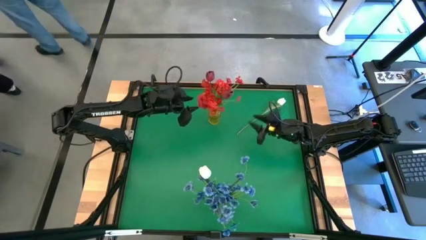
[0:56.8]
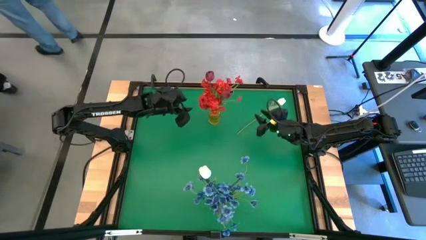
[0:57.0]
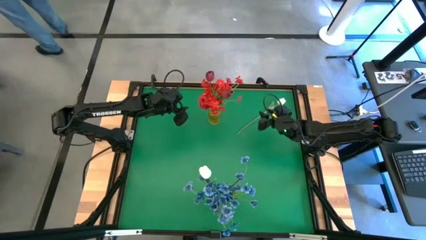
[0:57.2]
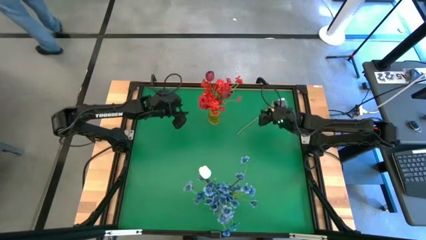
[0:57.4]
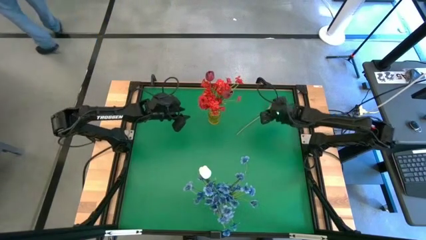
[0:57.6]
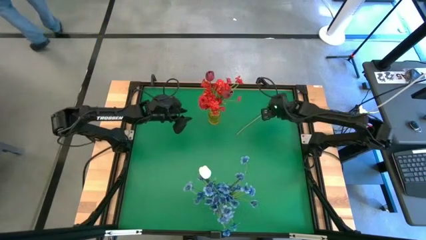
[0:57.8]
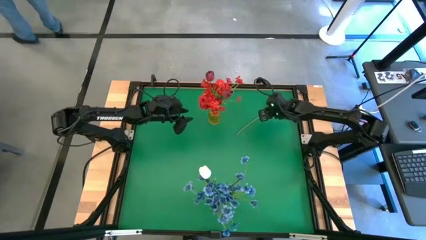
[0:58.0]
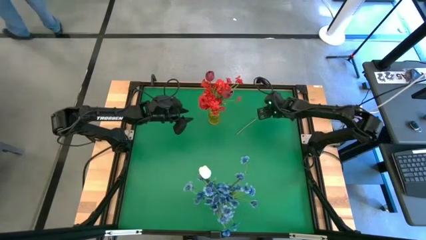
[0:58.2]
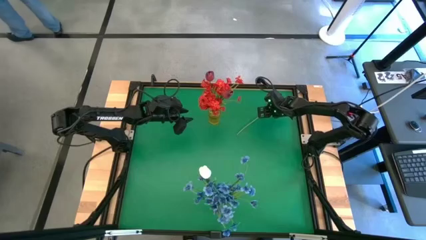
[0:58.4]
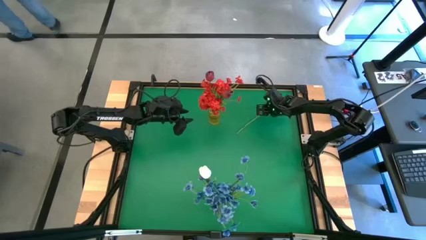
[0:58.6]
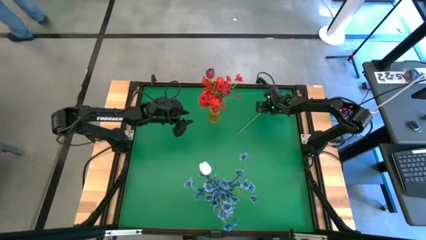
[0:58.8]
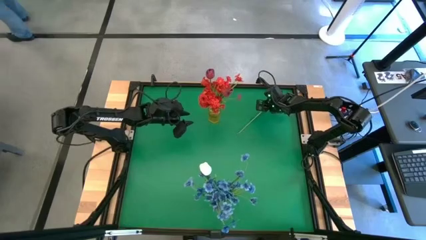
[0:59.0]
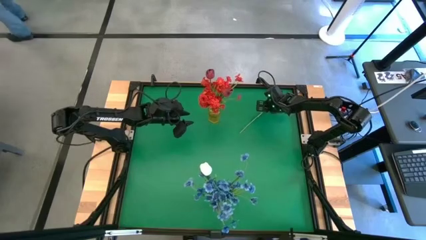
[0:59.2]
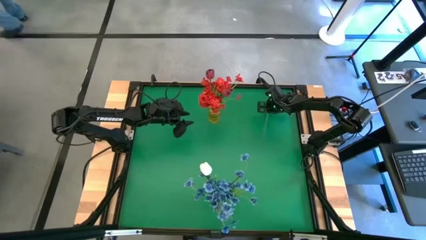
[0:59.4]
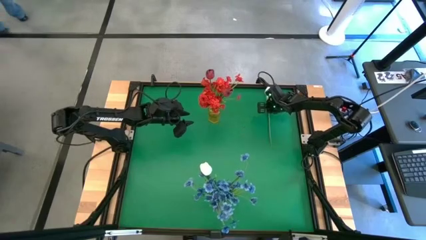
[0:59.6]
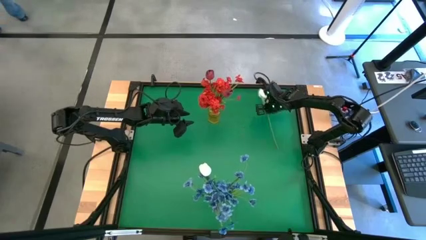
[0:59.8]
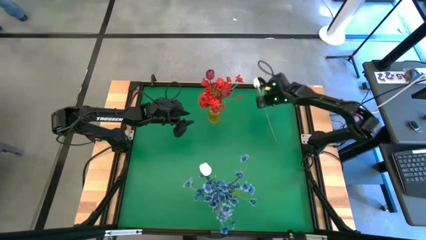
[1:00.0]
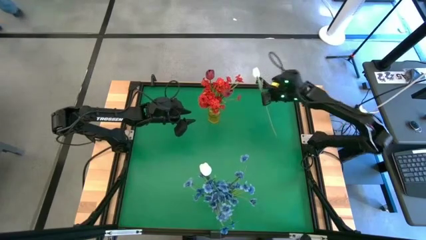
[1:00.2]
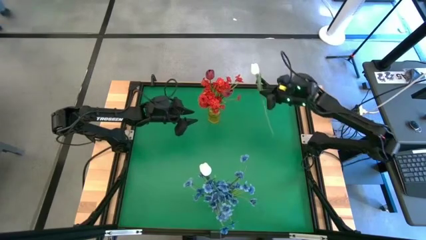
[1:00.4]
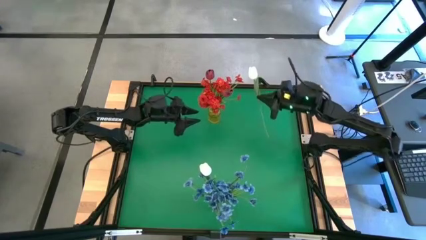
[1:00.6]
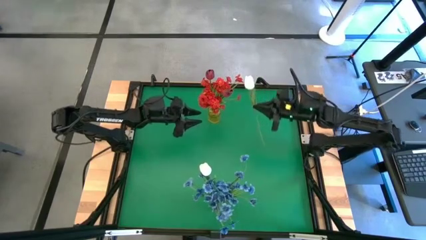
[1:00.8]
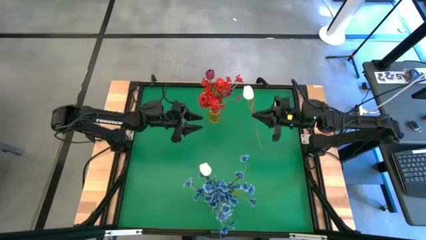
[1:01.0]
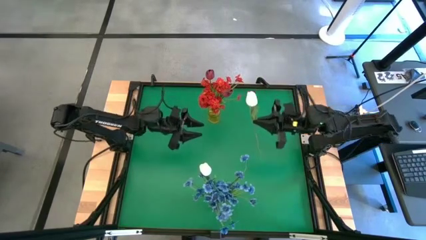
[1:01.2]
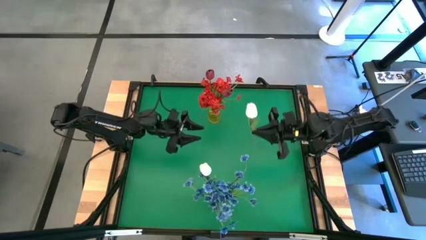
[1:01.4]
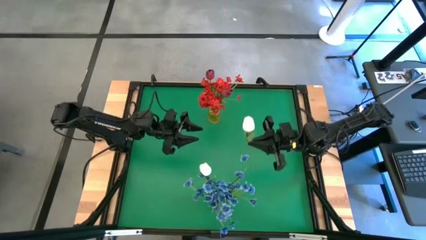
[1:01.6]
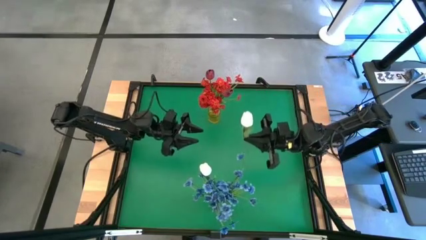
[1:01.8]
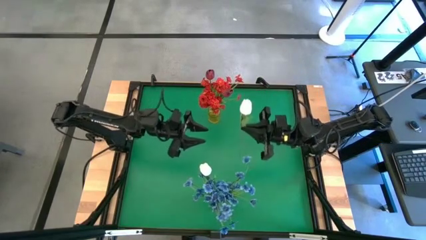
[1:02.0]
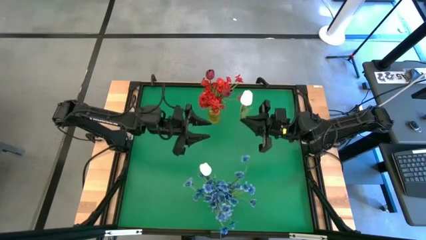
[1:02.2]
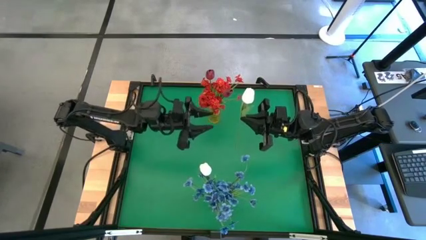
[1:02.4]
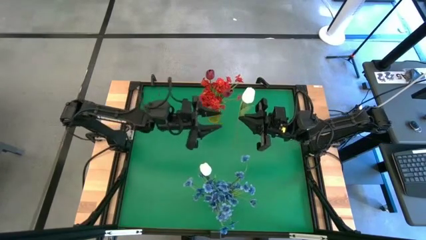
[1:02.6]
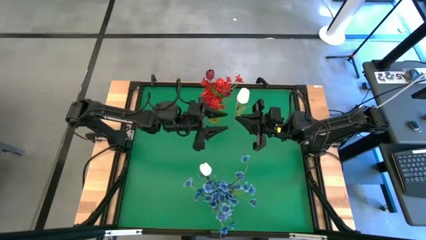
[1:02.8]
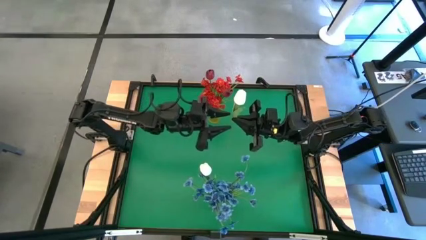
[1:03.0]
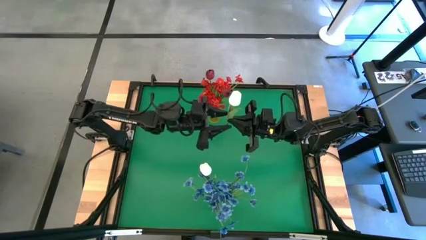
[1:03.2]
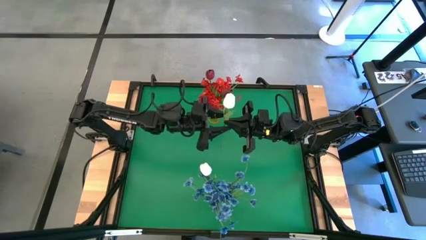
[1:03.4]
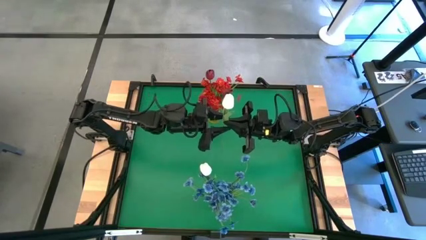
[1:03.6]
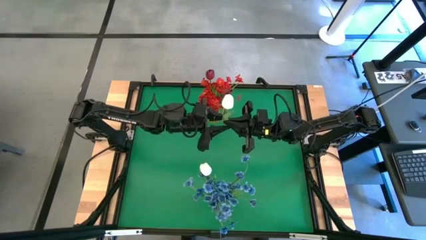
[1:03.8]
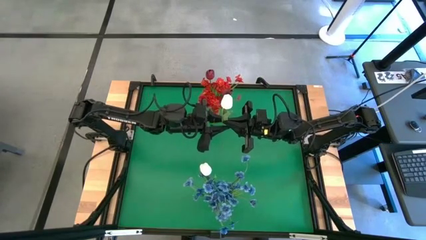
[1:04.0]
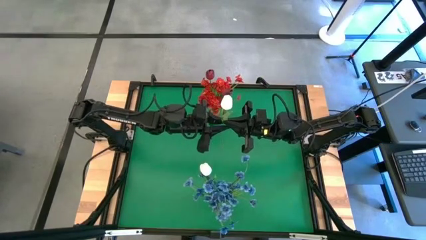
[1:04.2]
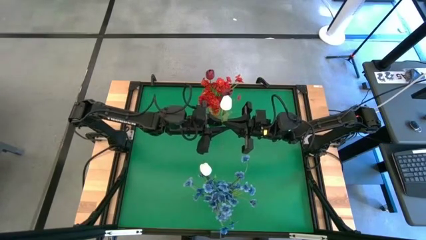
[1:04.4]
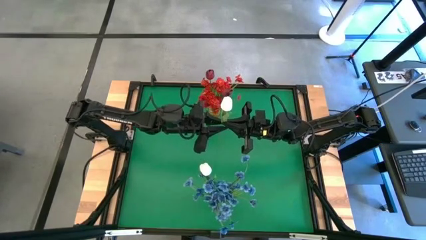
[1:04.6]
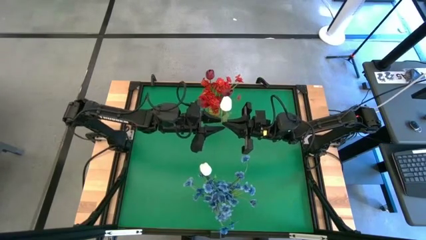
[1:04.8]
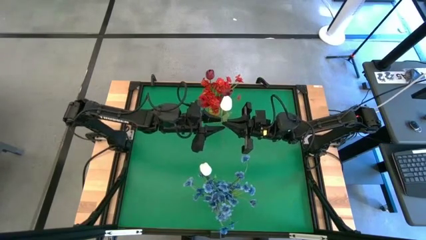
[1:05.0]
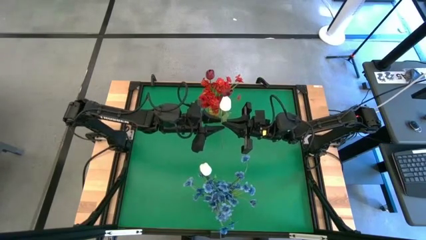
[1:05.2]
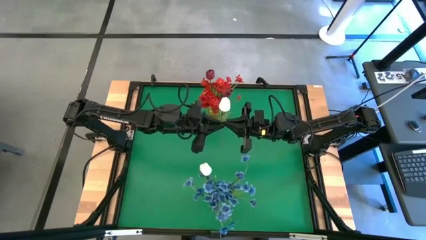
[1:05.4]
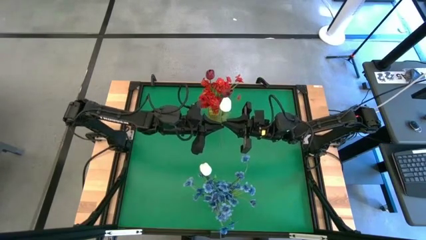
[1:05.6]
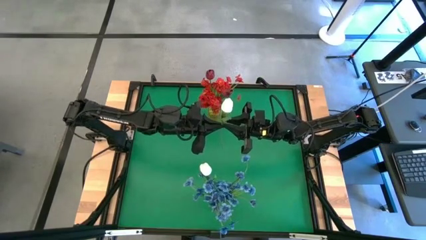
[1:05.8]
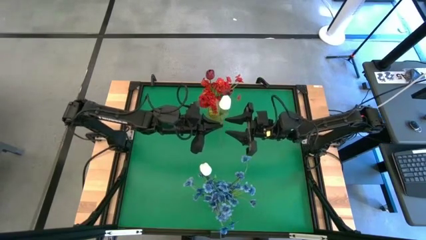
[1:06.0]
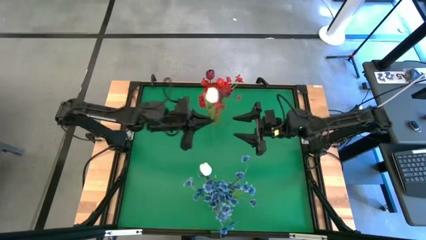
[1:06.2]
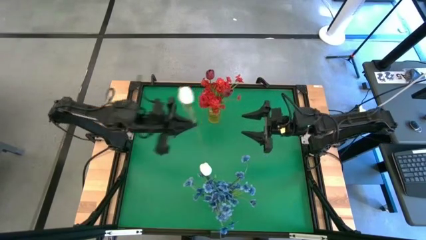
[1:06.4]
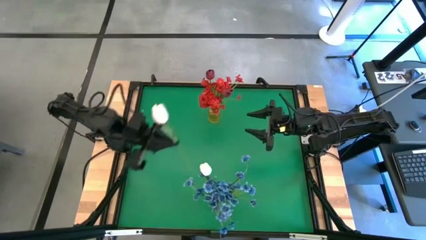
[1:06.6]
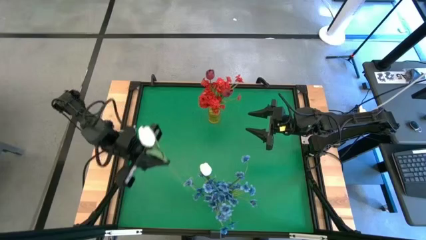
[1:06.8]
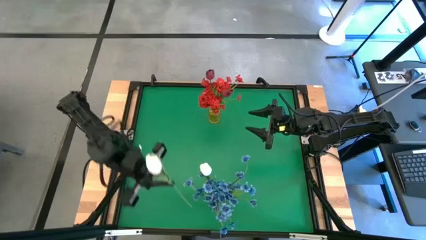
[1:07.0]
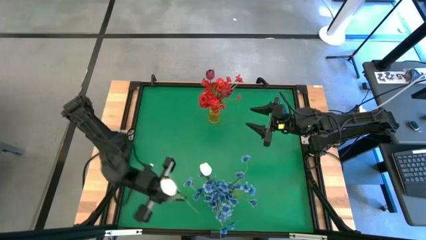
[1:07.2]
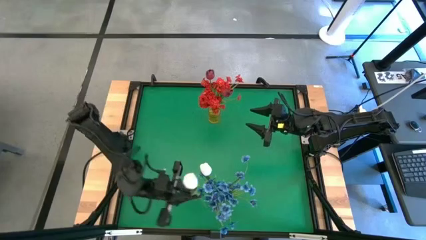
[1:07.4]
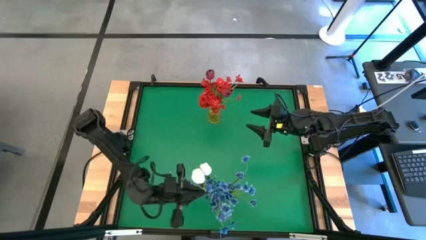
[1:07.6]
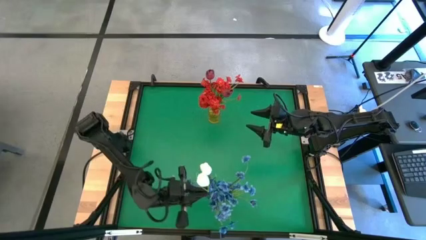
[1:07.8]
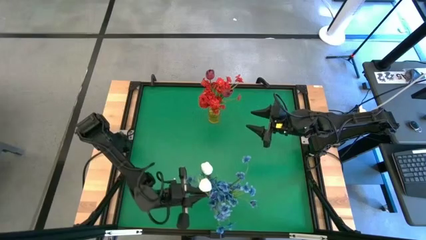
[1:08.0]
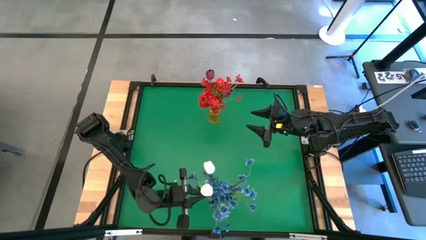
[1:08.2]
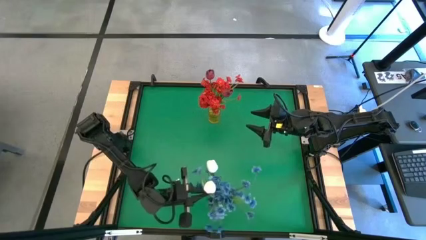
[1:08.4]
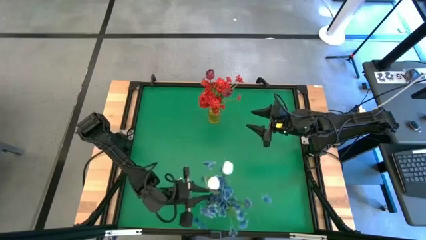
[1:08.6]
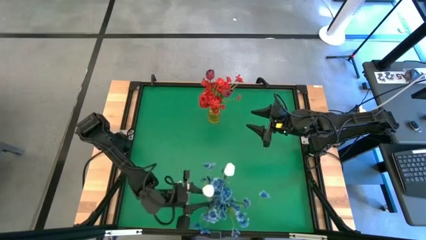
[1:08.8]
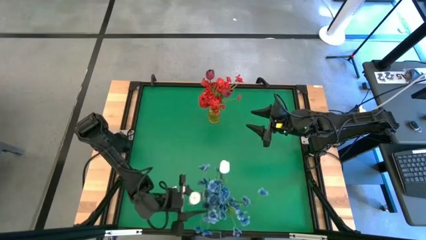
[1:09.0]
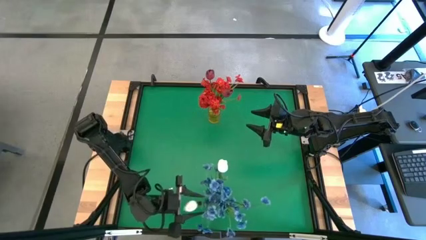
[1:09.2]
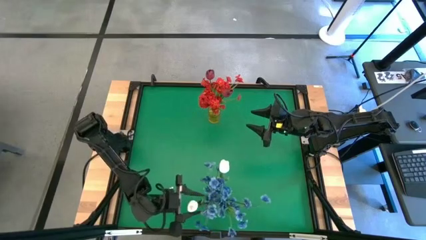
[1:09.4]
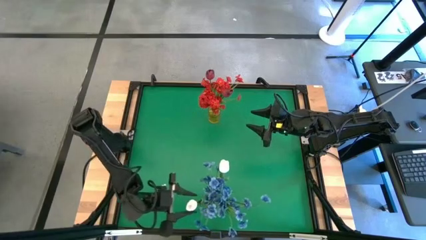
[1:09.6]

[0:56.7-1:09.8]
Task: Sort flowers into vase by color
Put the white tulip into the transparent vase
